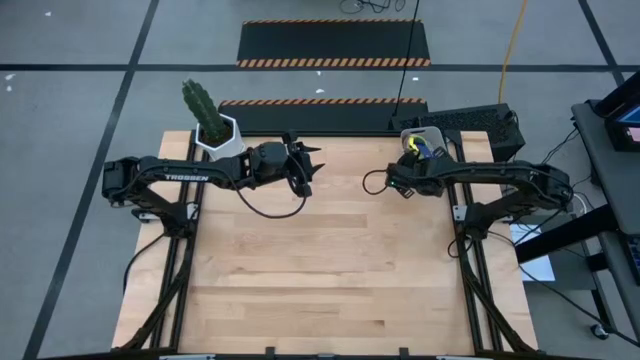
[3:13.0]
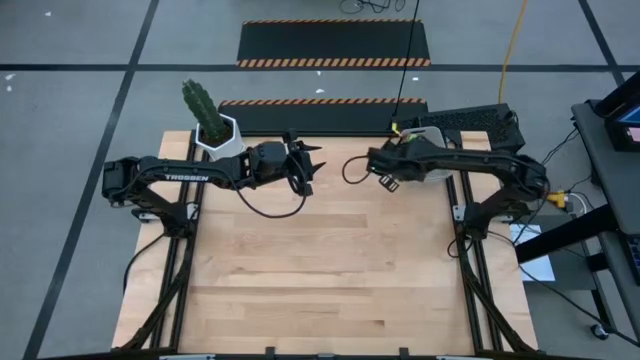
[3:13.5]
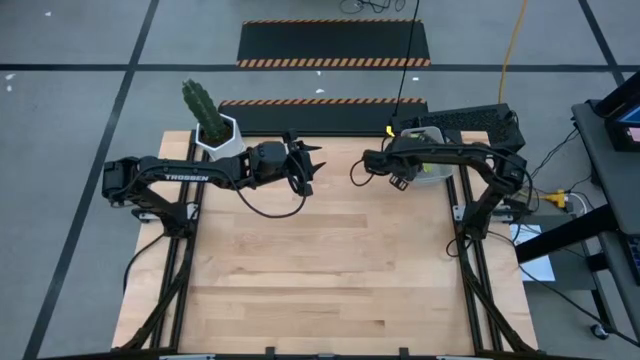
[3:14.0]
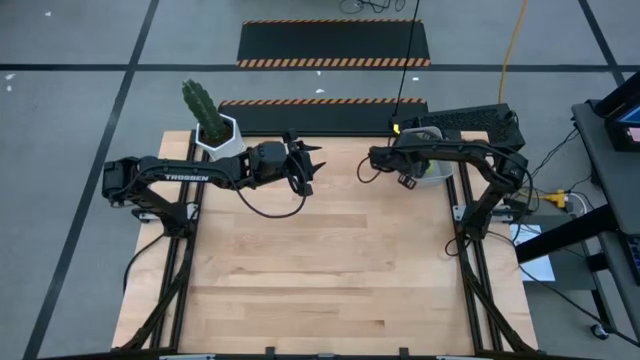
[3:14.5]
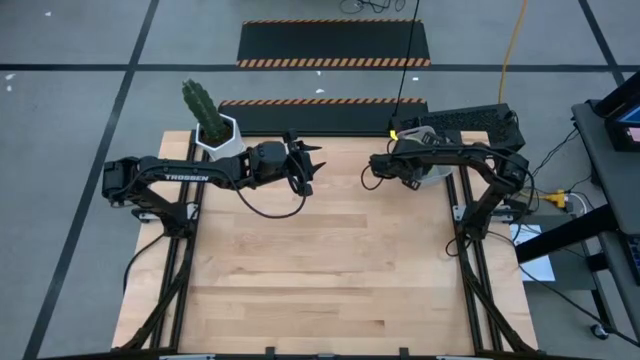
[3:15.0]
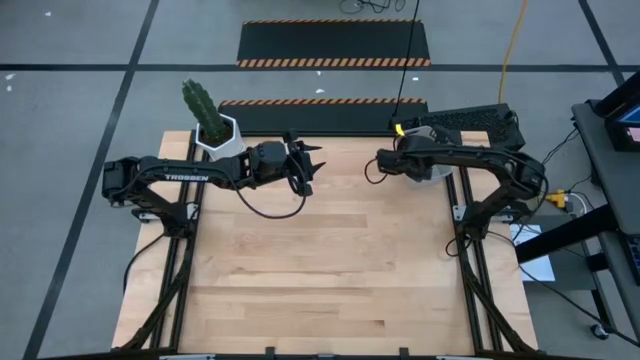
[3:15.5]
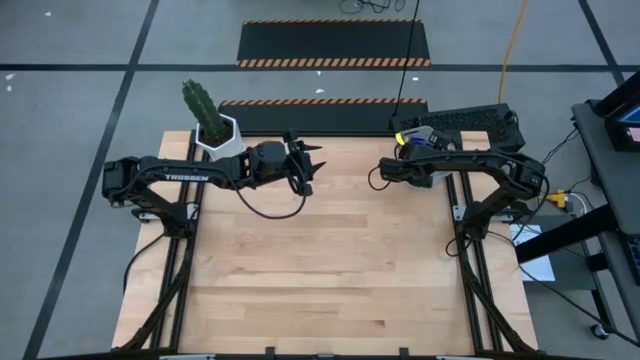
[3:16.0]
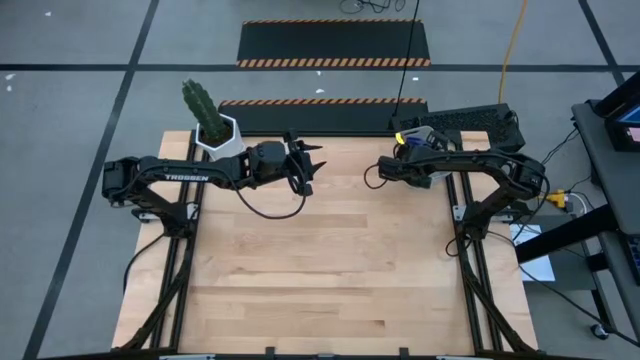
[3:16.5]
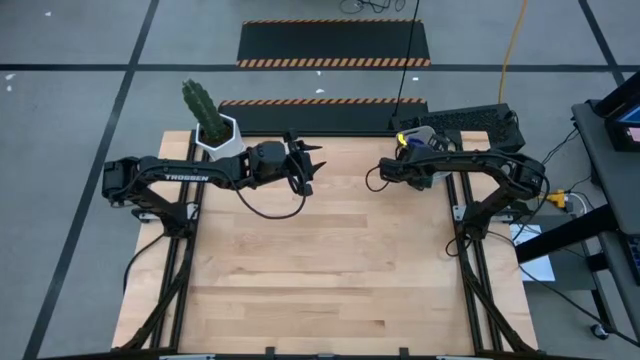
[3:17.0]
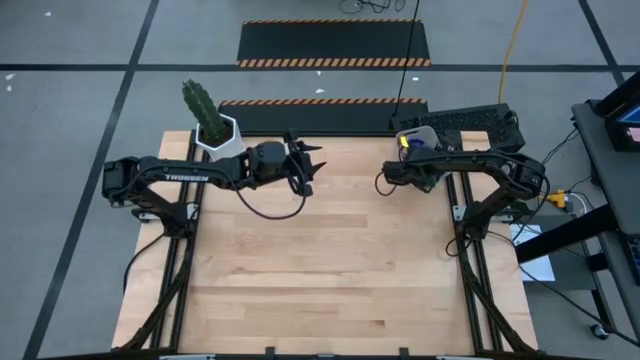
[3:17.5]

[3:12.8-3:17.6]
Task: Nest measuring cups in basket
Stack the purple measuring cup on top of the green measuring cup in the gray bin

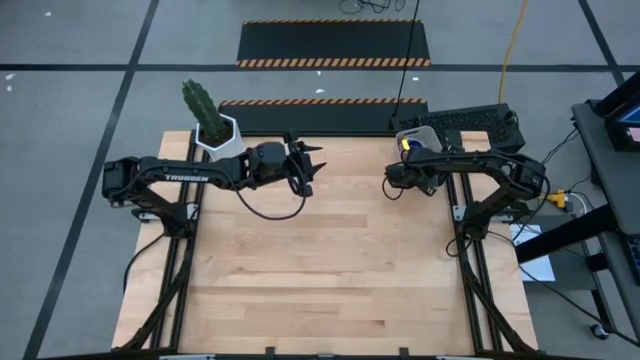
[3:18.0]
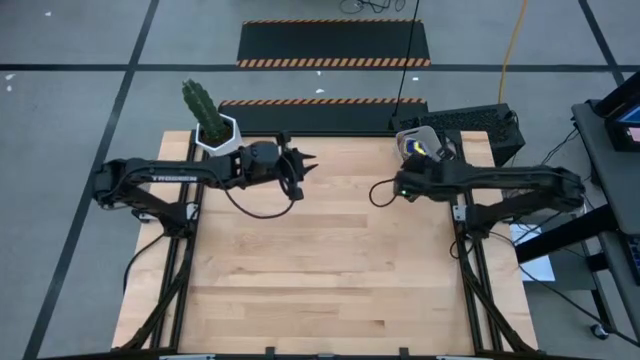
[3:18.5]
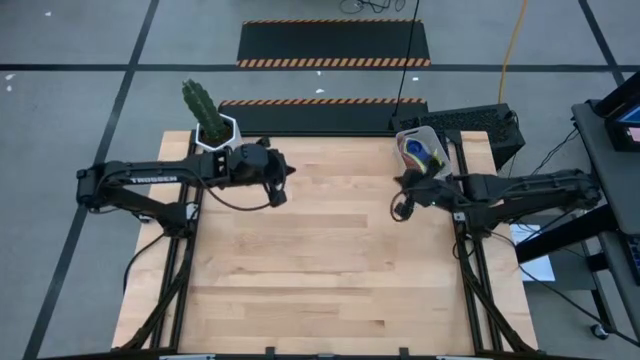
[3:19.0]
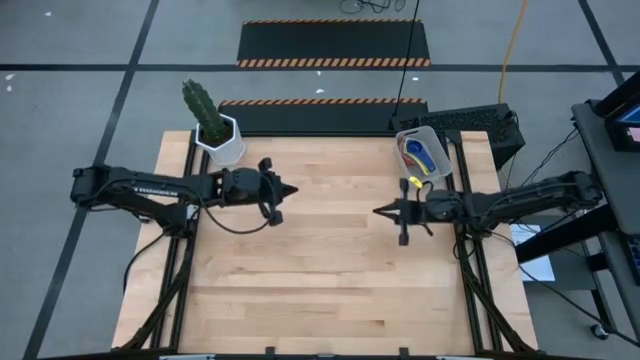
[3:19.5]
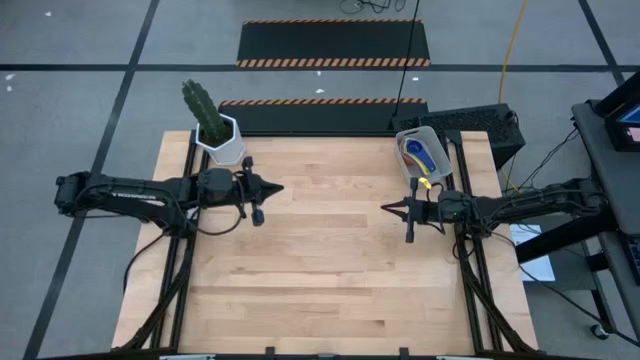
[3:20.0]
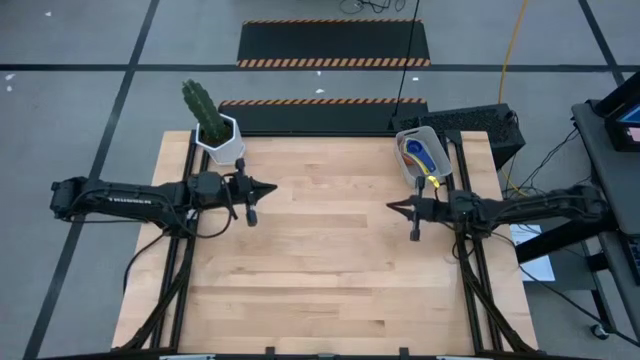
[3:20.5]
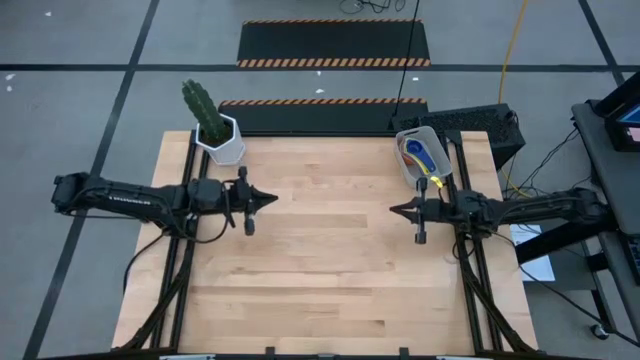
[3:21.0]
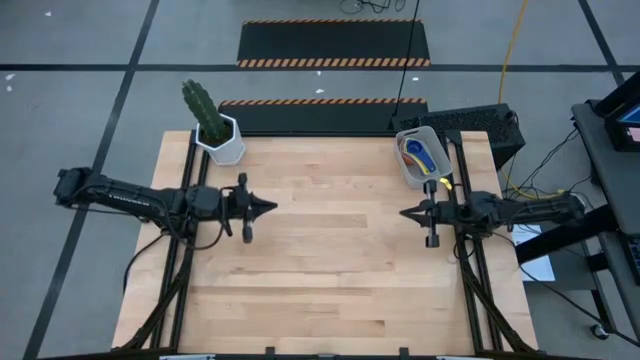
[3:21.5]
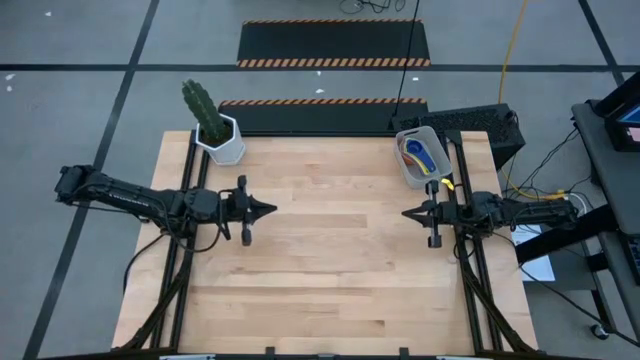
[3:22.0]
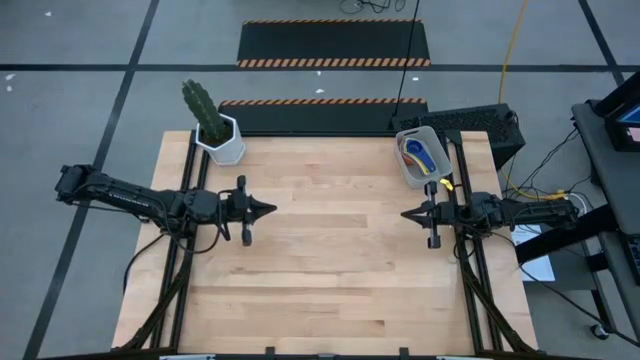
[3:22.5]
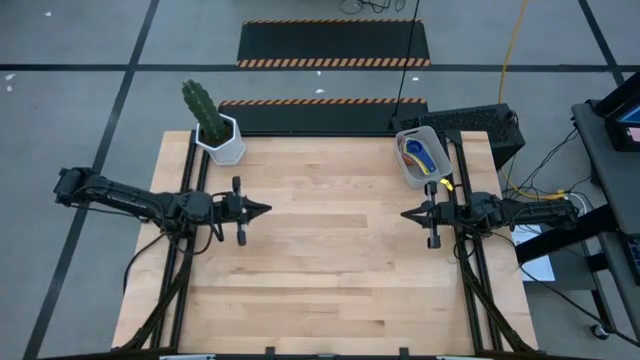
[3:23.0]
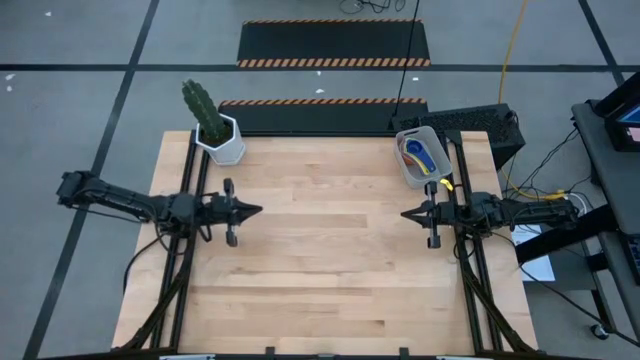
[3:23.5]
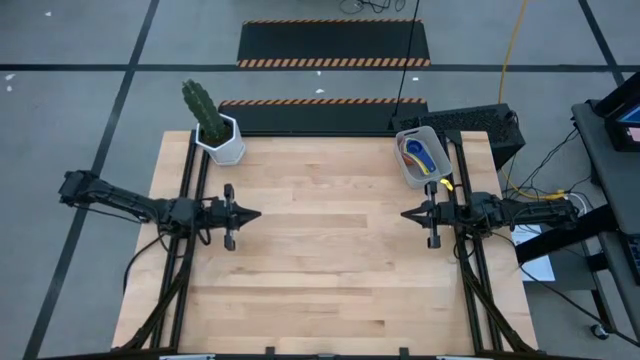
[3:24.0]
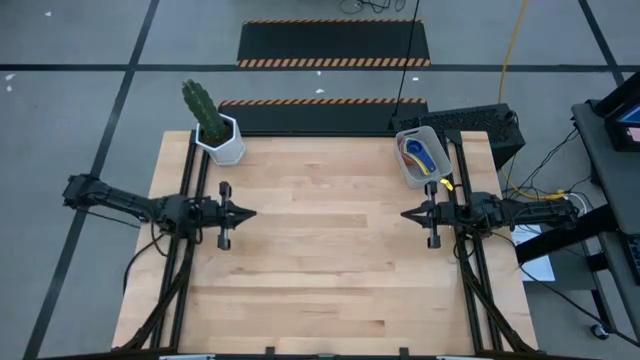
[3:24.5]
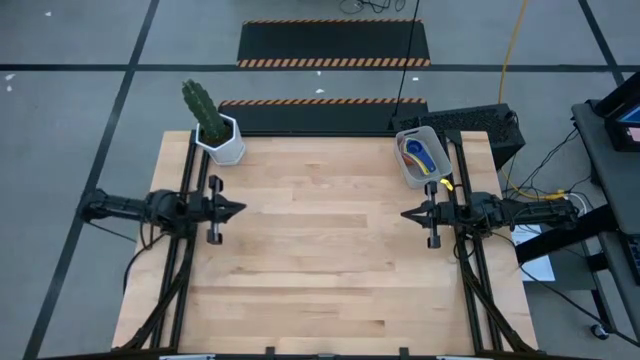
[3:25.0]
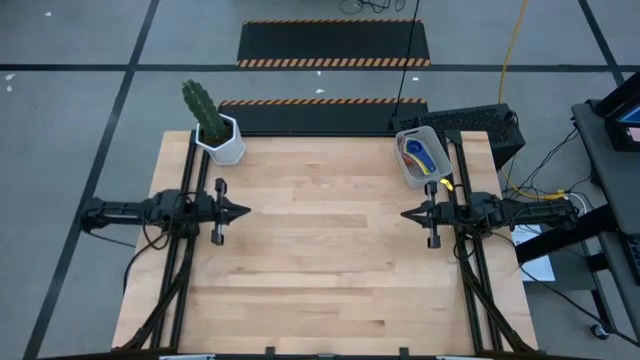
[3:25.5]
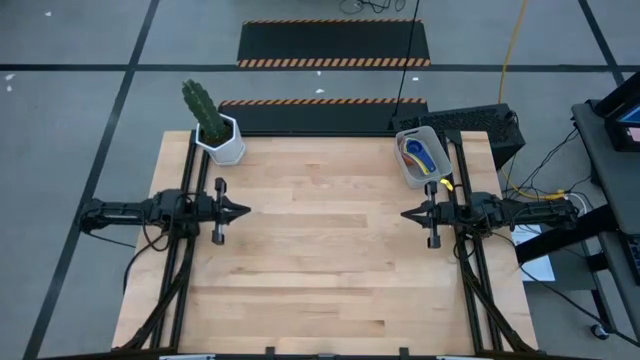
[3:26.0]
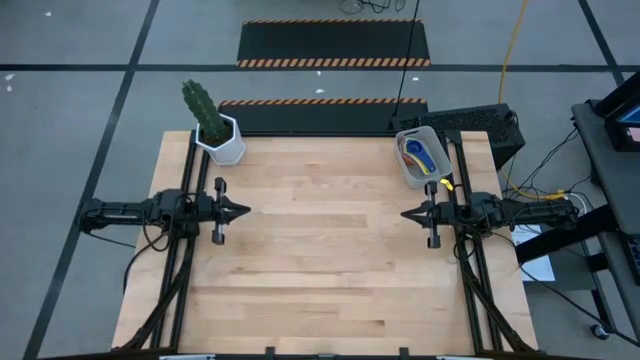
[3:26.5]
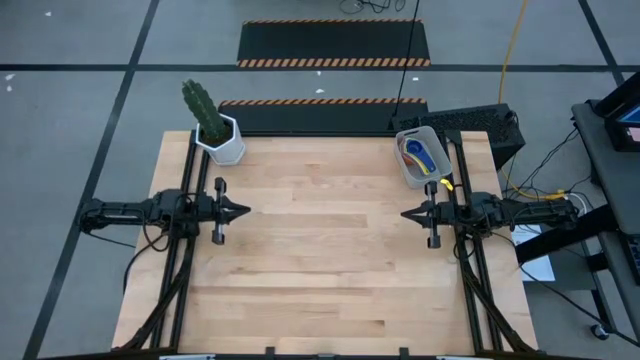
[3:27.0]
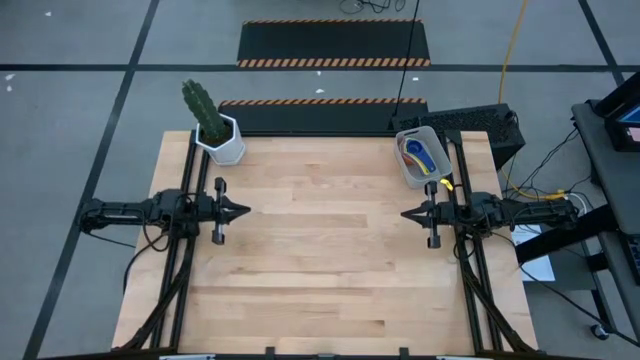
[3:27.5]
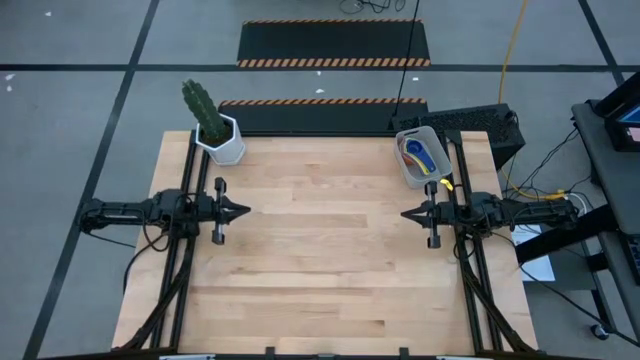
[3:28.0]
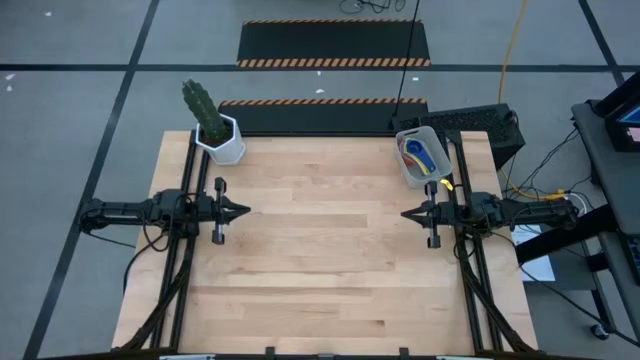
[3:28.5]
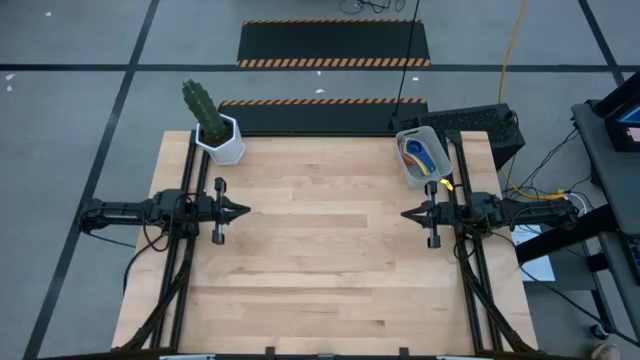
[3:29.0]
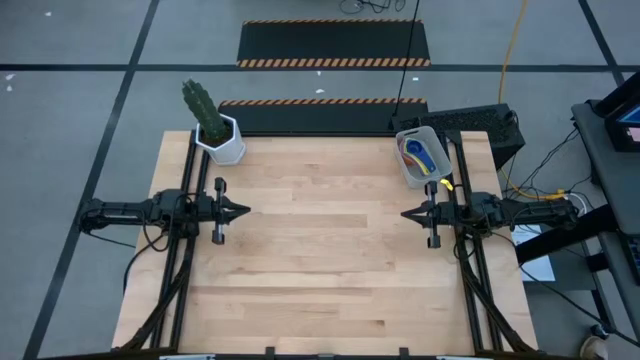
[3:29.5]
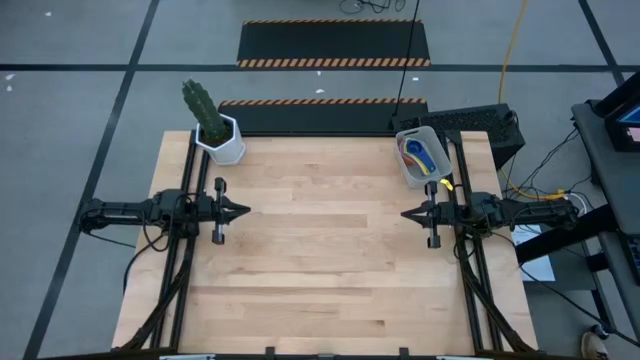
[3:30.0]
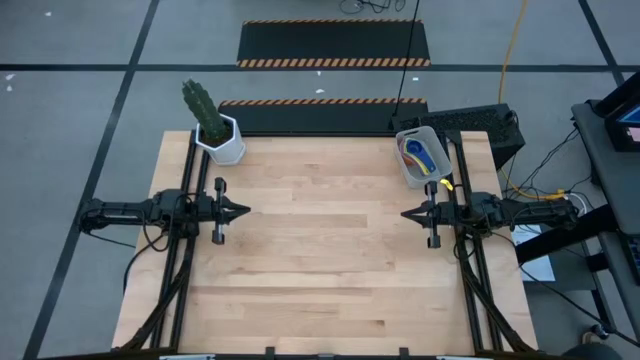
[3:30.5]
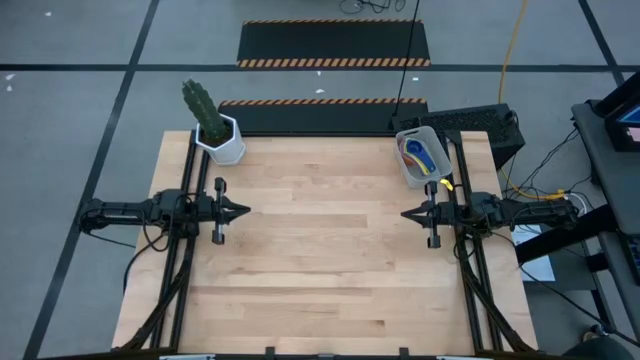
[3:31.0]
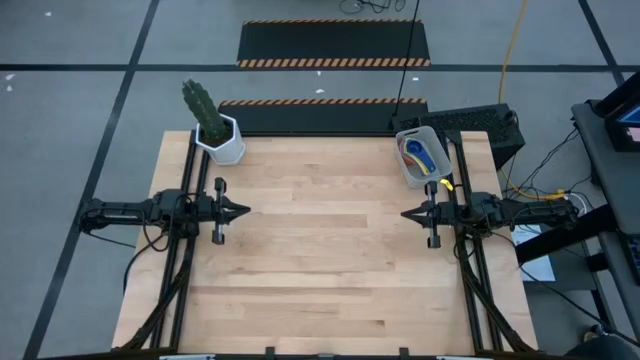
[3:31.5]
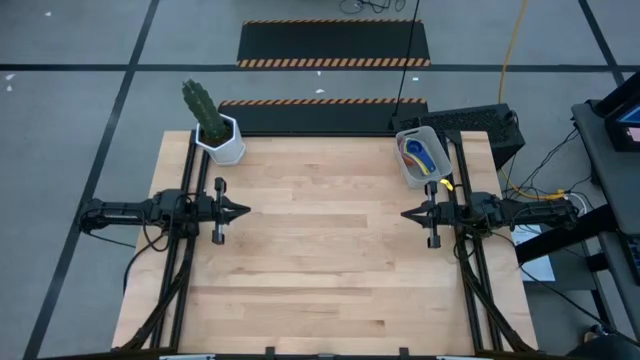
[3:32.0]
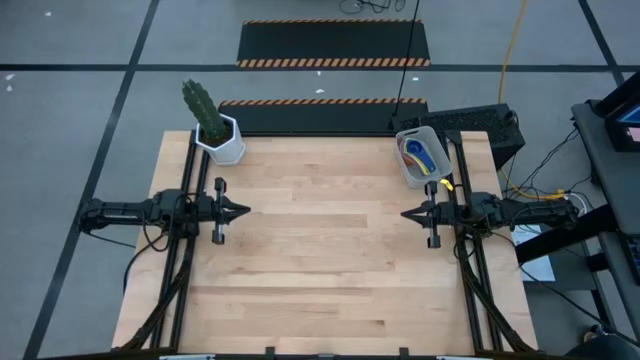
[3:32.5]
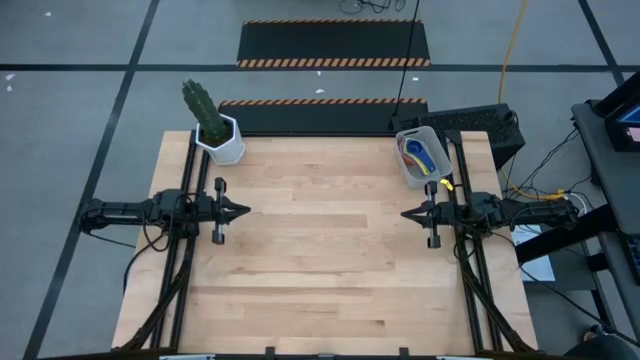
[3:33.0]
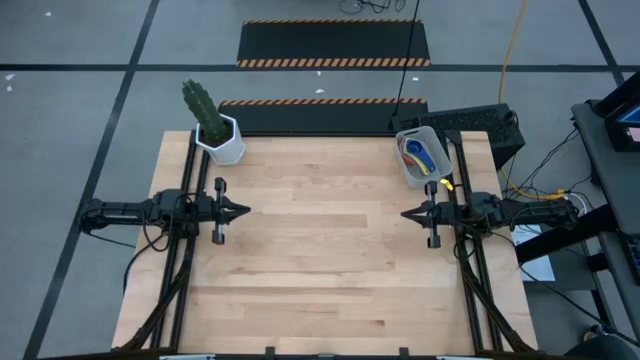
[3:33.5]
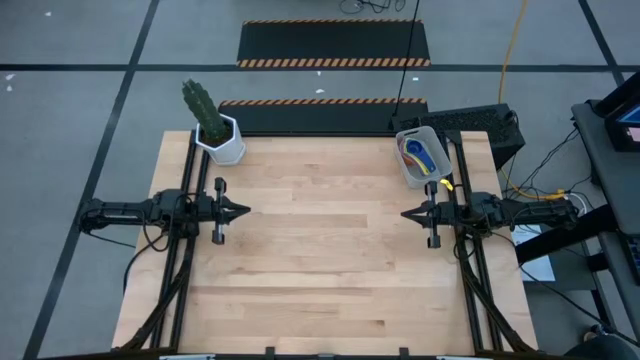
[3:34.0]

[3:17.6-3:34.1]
Return to Home Position
